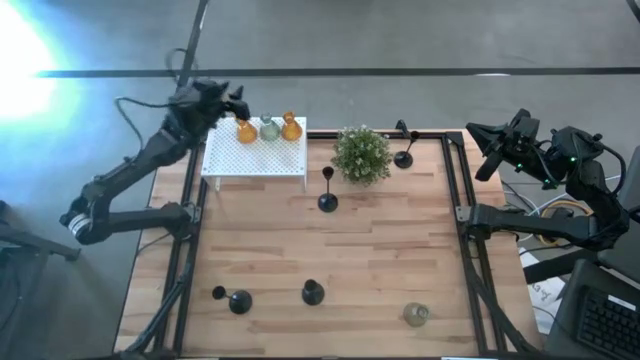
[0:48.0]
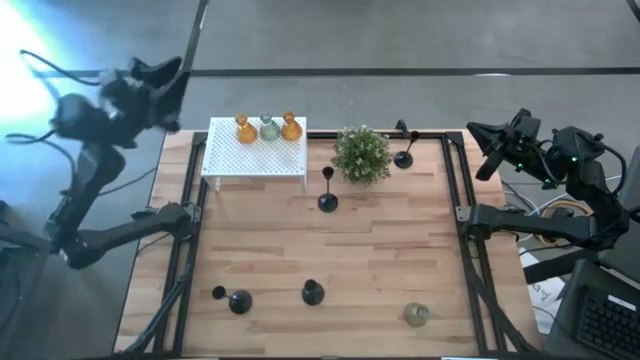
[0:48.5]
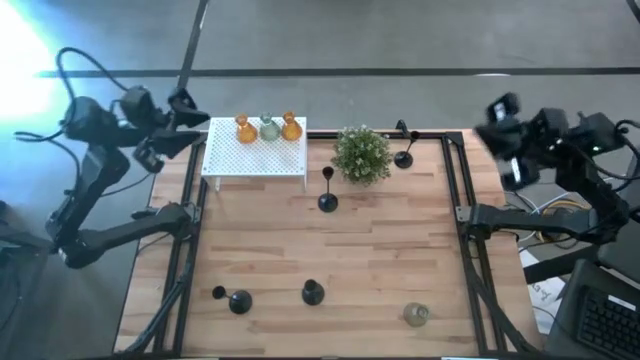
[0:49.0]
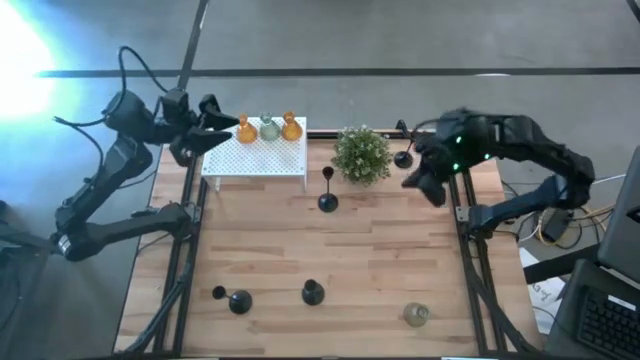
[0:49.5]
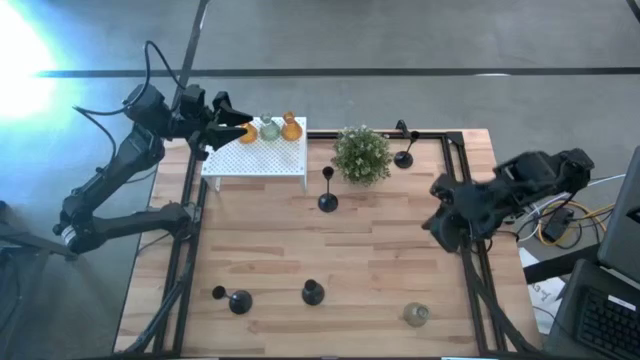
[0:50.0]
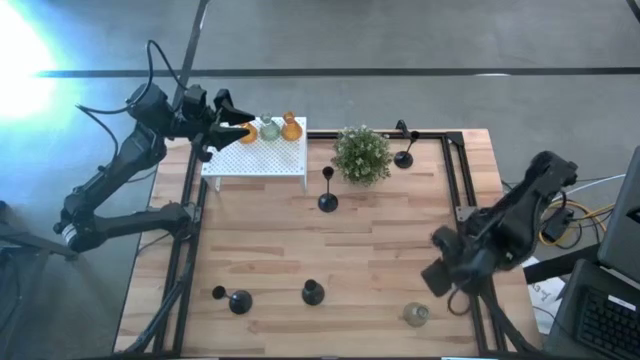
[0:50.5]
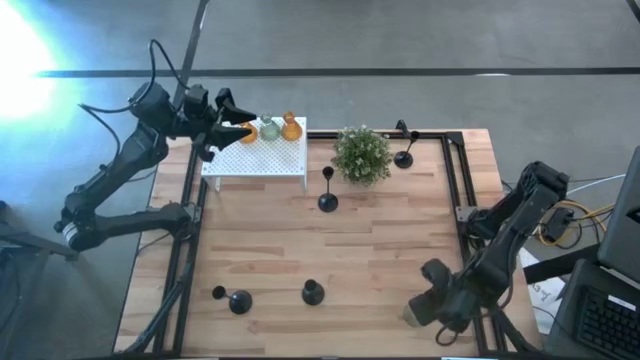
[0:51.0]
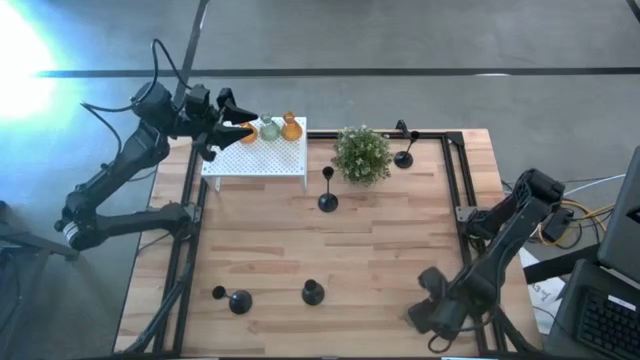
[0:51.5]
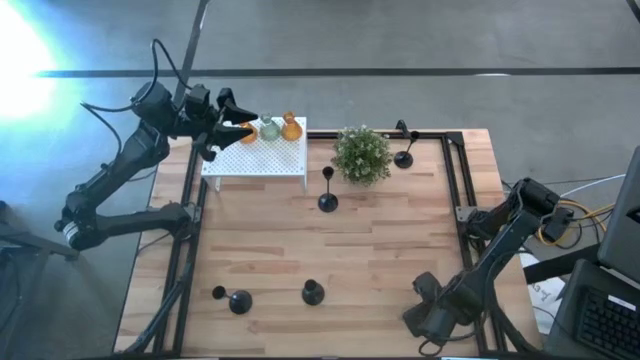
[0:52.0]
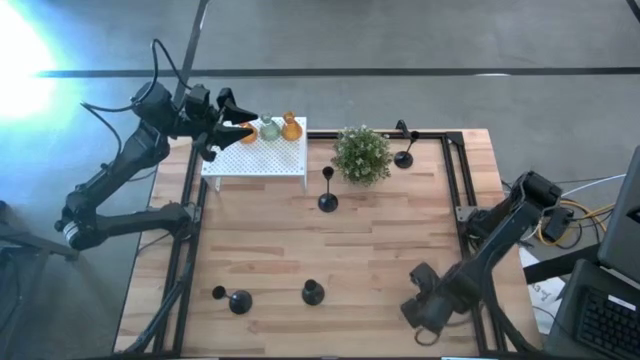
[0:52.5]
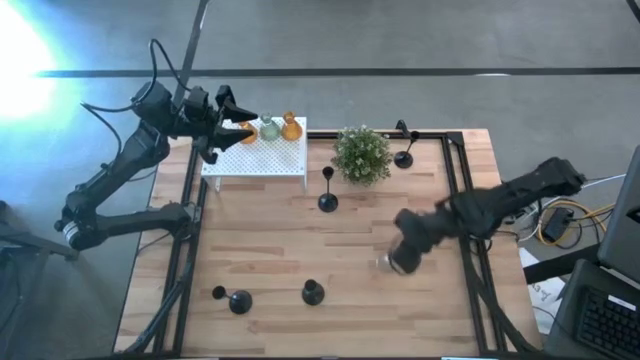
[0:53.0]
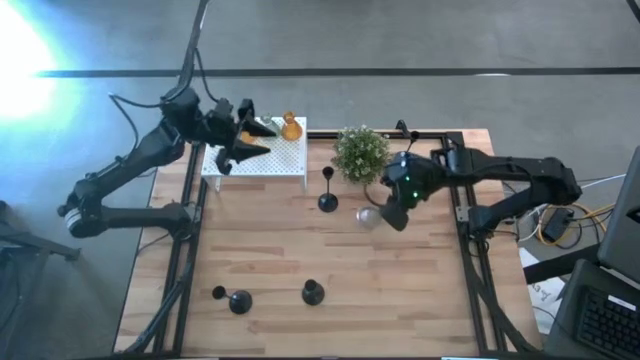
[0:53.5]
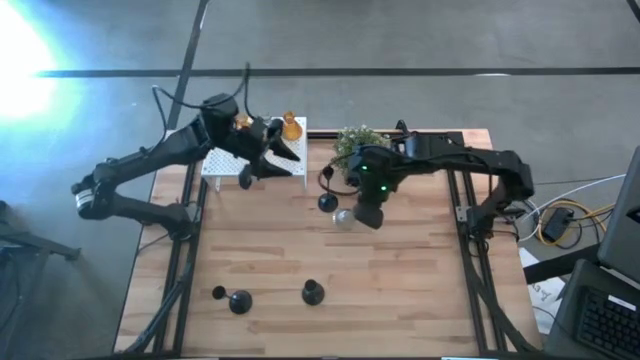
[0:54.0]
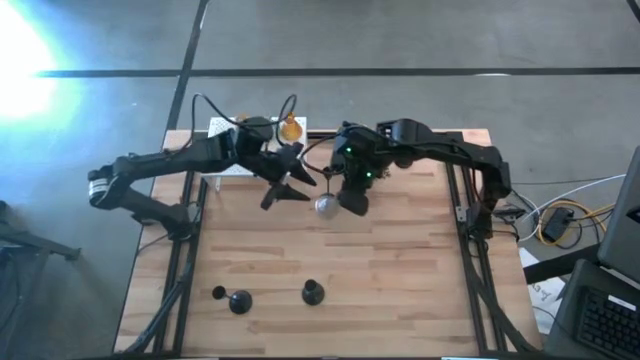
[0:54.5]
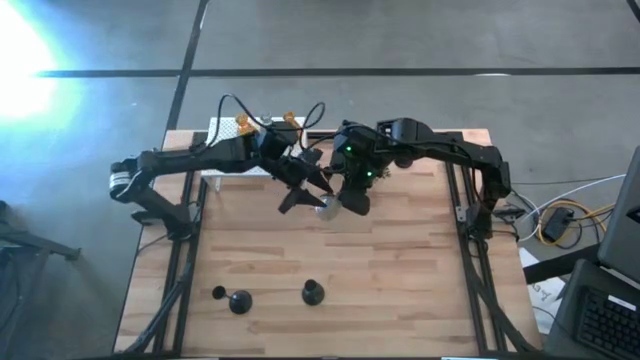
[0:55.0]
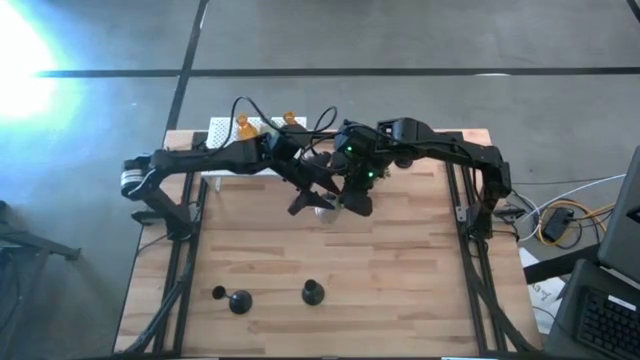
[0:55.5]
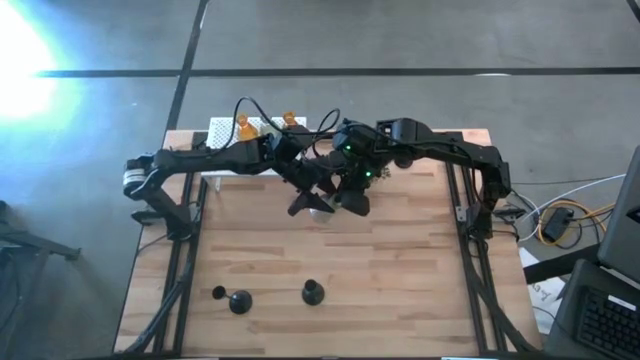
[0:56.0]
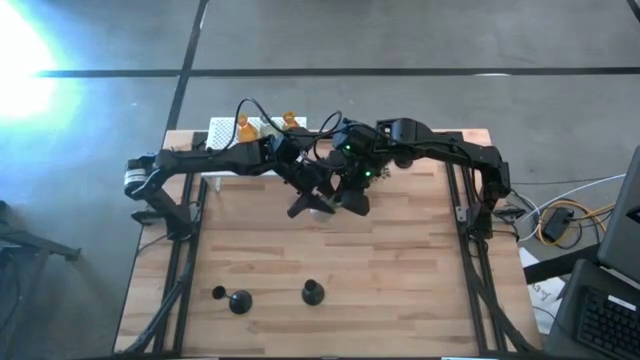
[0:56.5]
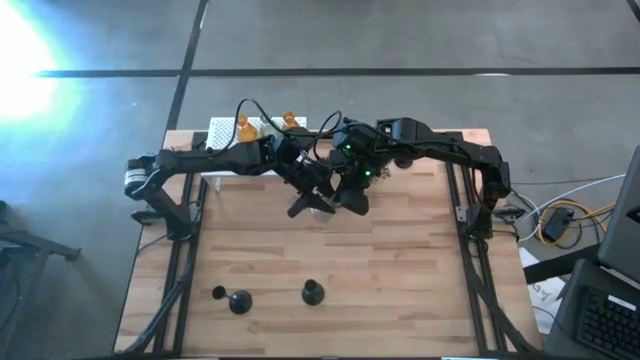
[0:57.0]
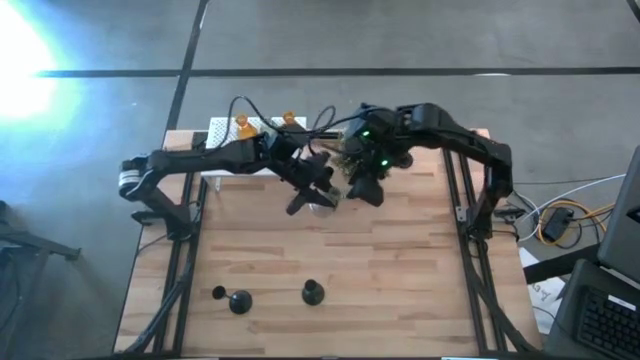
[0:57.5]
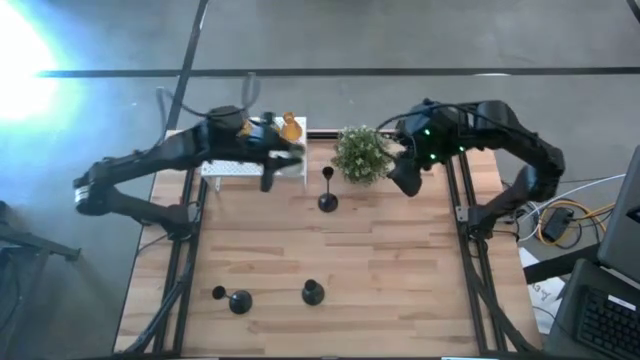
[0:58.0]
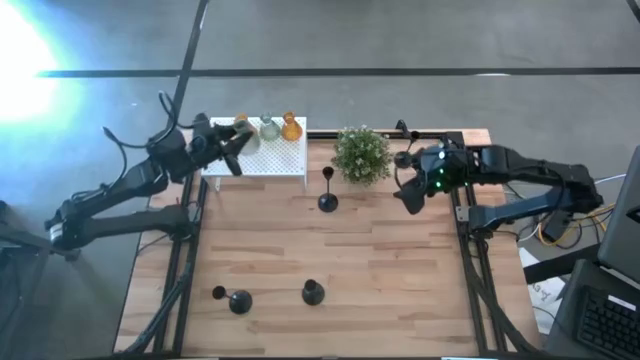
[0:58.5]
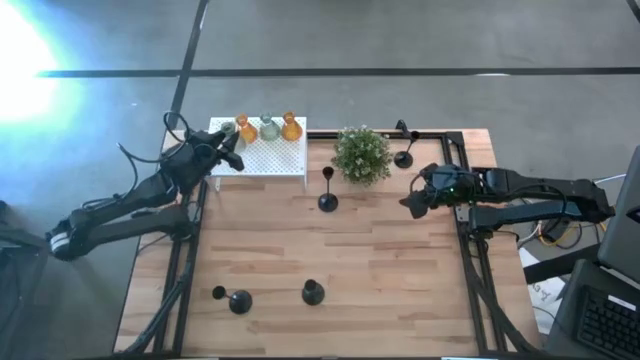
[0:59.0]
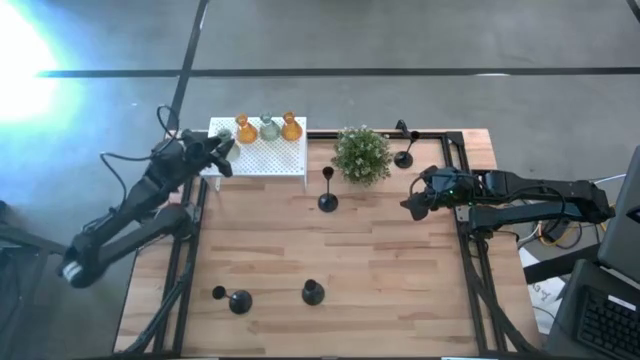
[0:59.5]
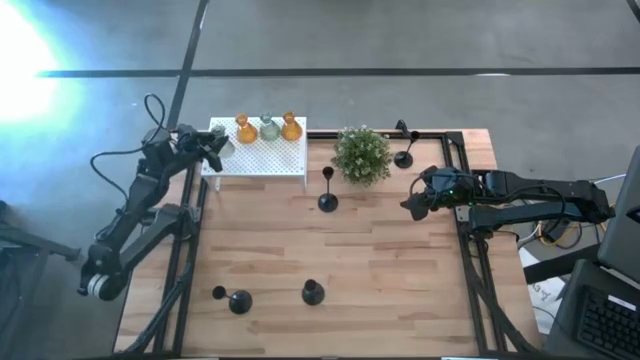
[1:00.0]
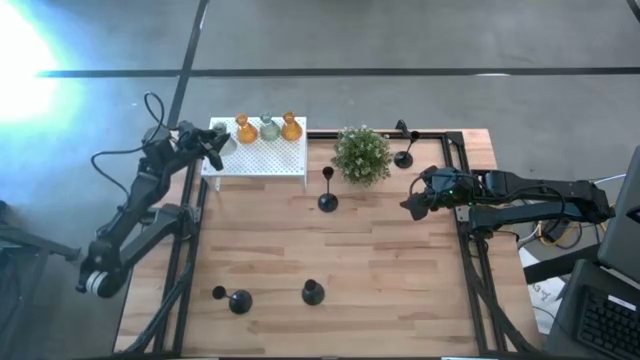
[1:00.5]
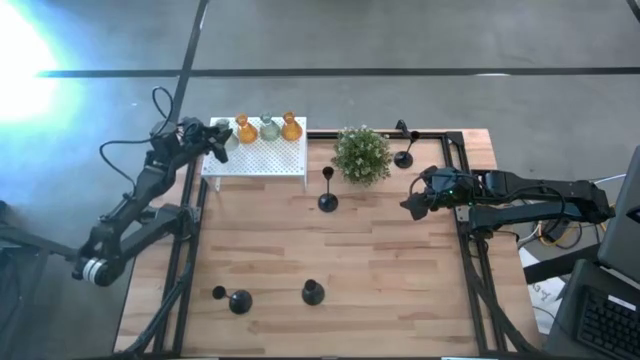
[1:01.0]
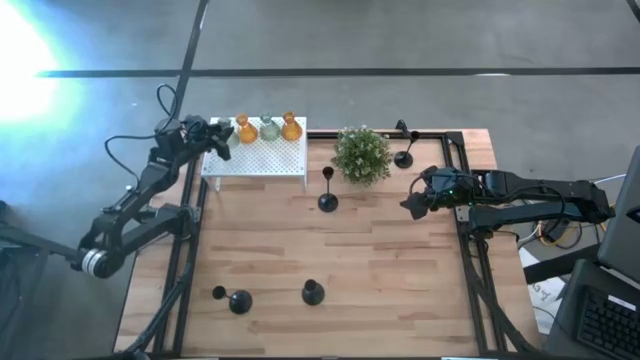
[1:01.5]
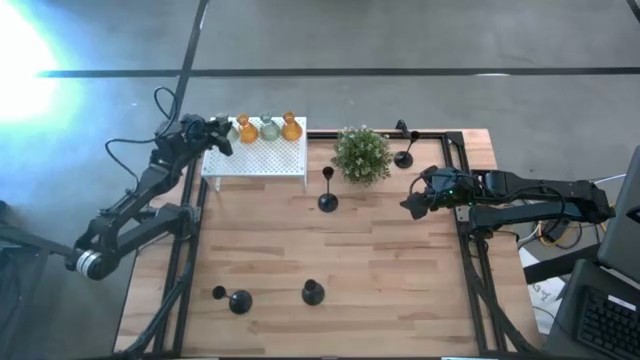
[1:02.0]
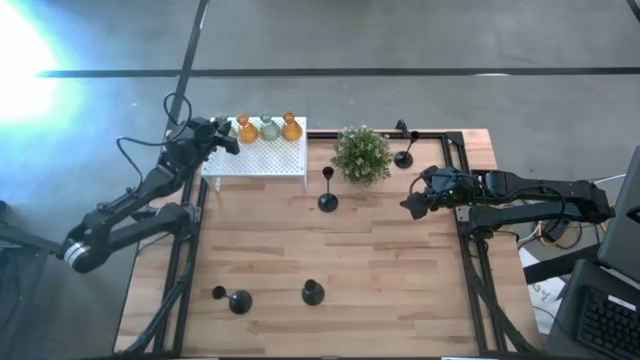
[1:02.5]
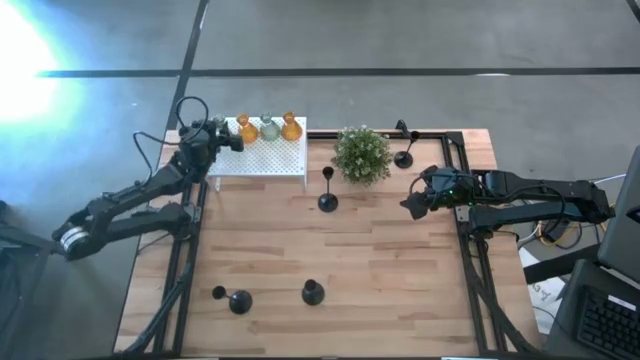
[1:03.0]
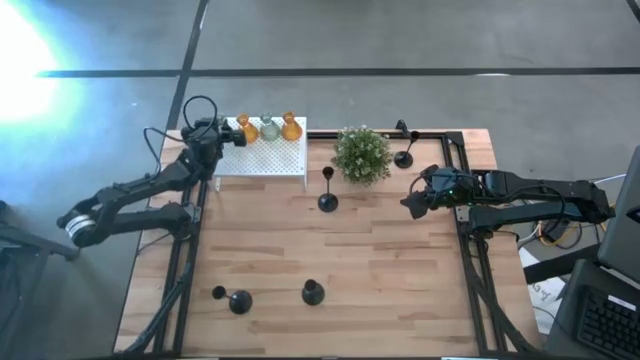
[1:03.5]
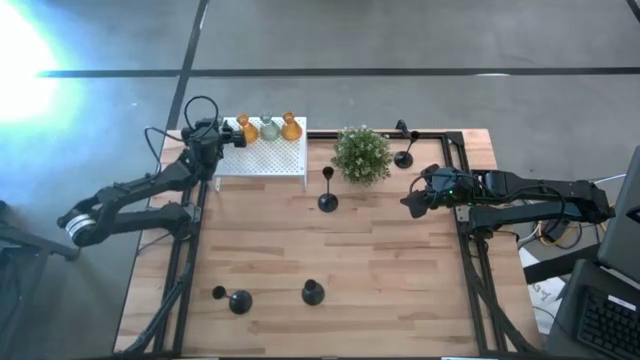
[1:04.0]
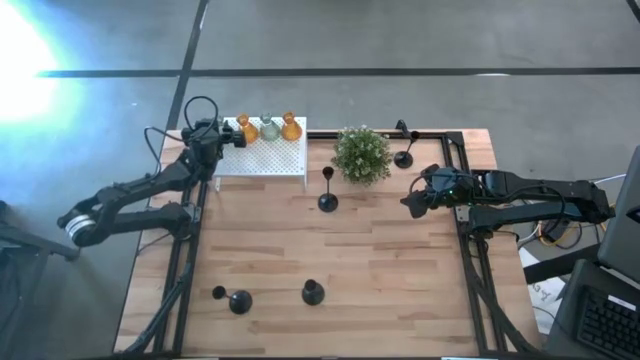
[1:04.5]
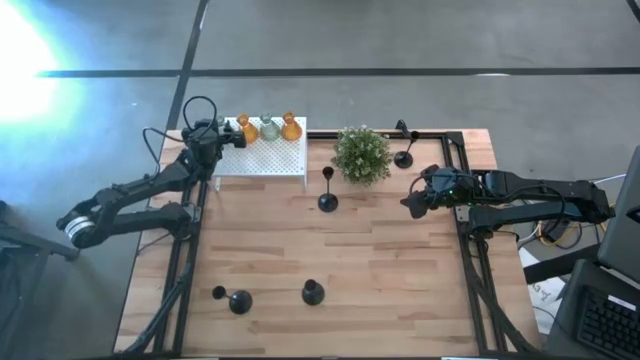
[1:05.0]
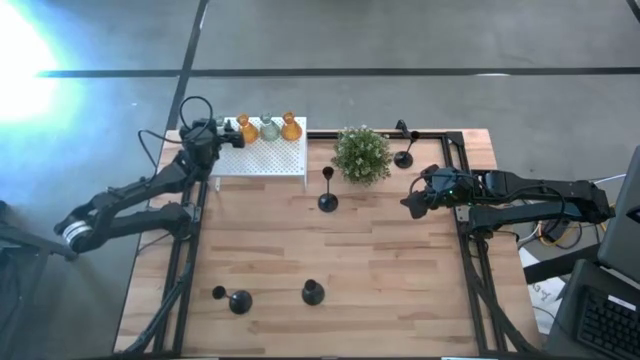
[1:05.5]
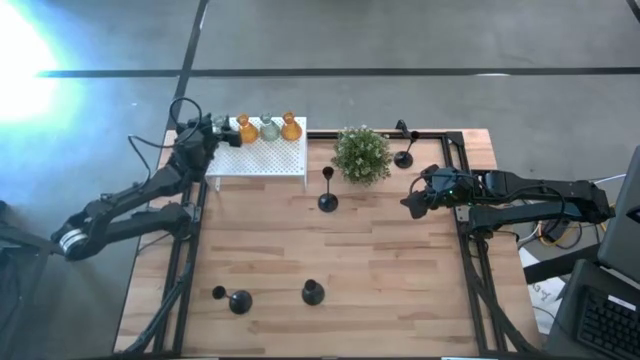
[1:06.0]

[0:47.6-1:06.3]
Task: Pick & Place candle stick holders
Put the top transparent glass candle holder on the shelf

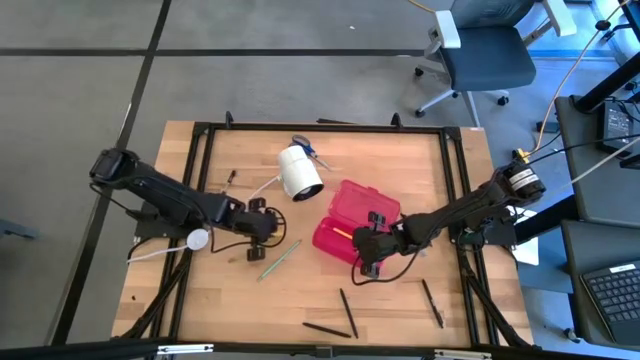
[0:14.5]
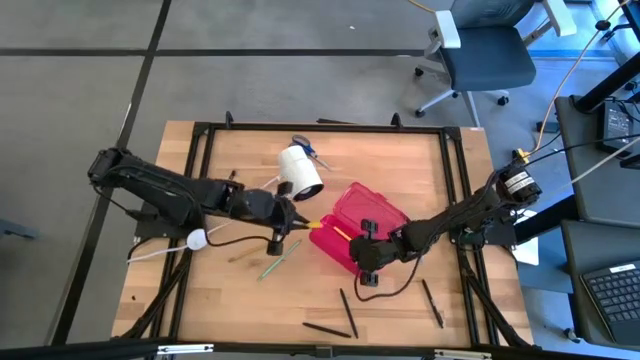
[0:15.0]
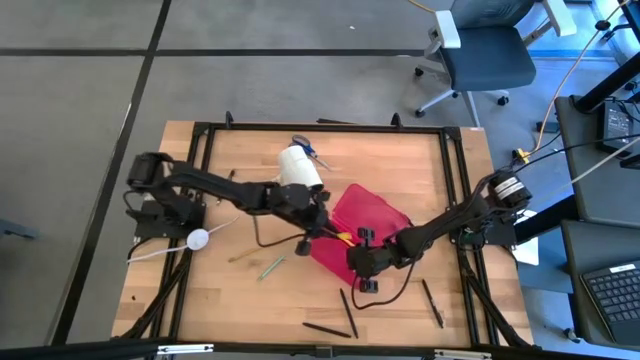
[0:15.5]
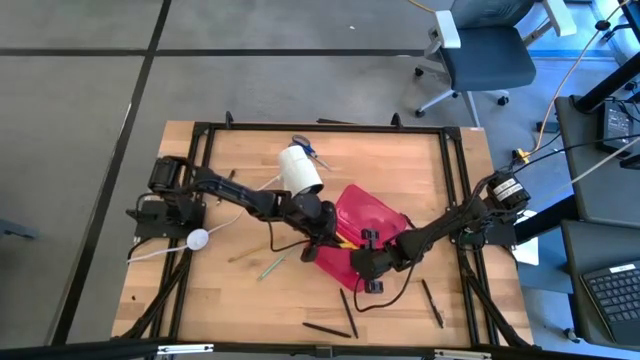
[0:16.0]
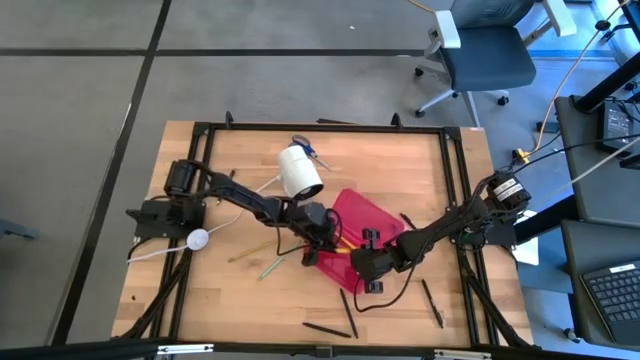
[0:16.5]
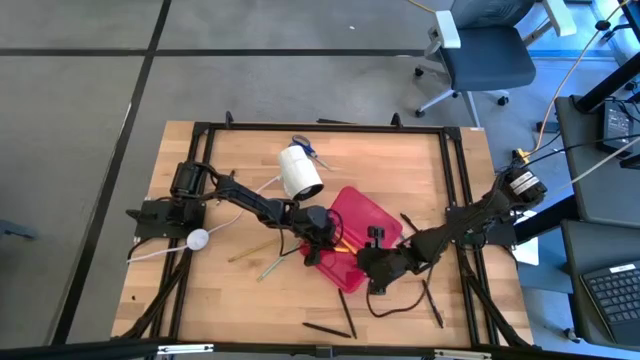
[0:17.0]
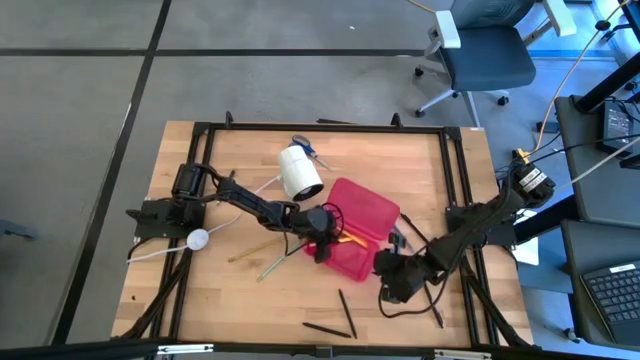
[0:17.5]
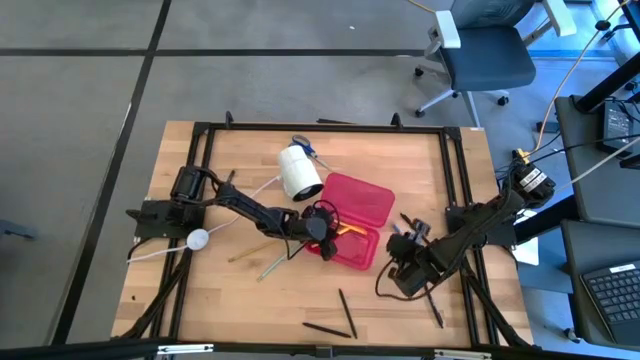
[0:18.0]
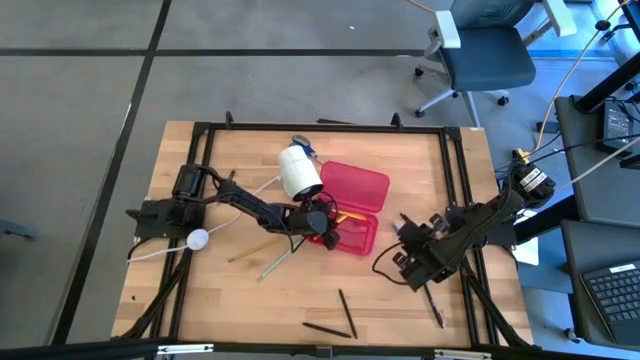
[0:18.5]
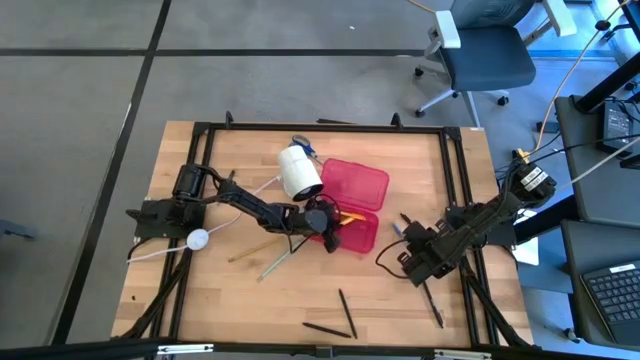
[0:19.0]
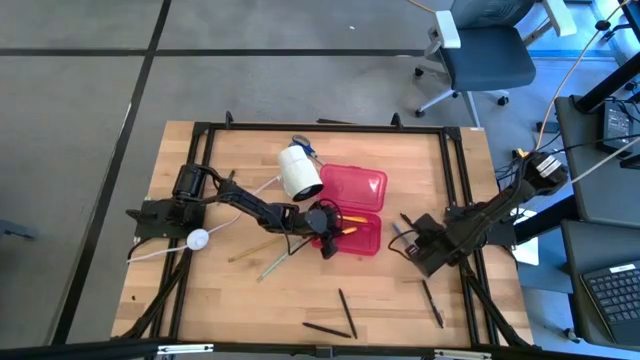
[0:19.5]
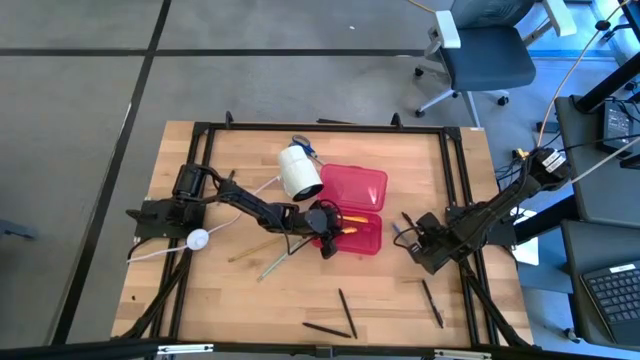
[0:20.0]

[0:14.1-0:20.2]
Task: Pick & place school supplies into a supply box
Put the yellow pen into the pink supply box
